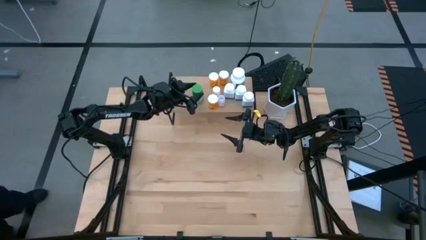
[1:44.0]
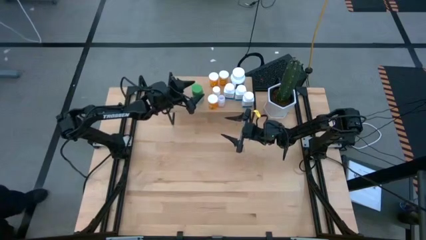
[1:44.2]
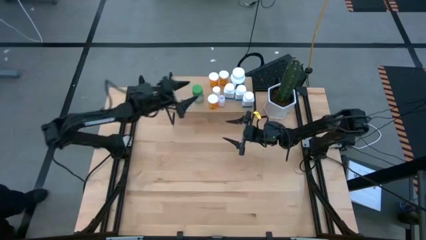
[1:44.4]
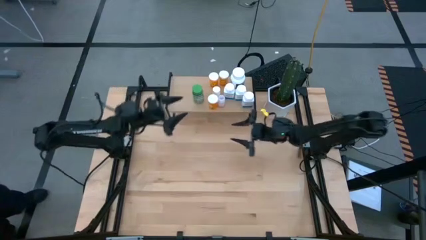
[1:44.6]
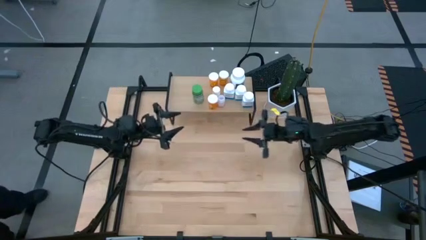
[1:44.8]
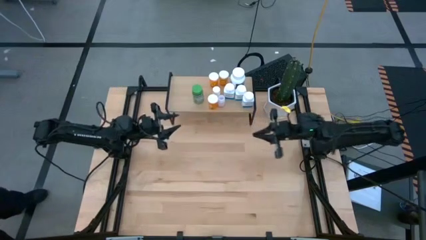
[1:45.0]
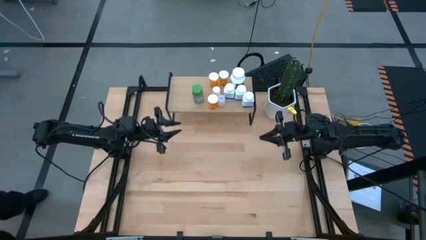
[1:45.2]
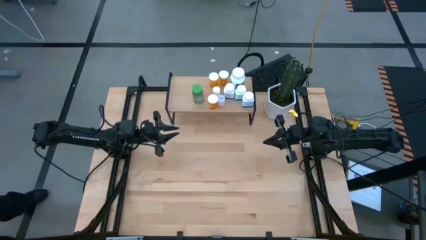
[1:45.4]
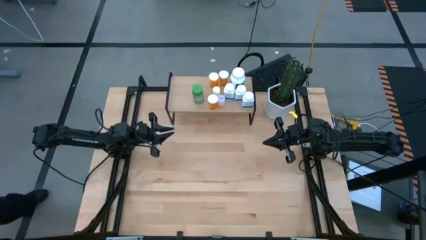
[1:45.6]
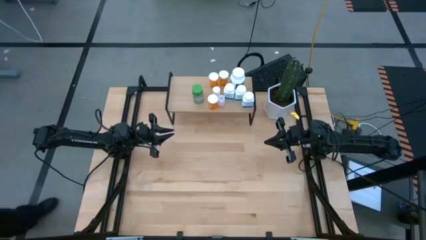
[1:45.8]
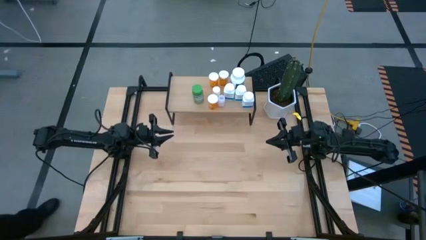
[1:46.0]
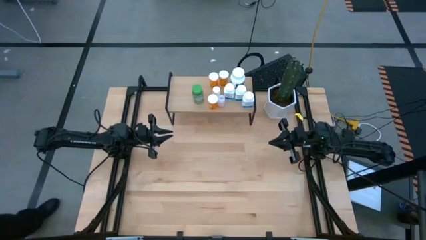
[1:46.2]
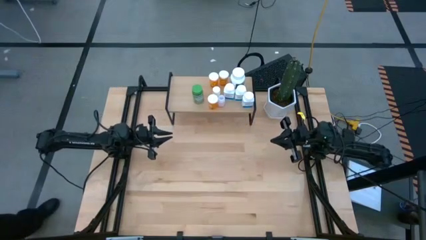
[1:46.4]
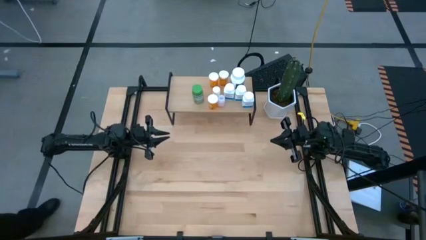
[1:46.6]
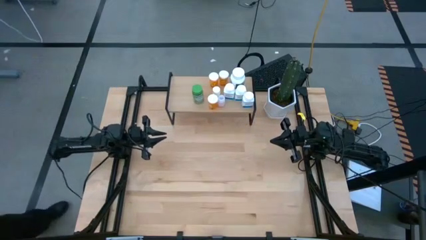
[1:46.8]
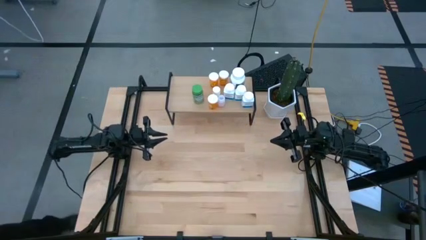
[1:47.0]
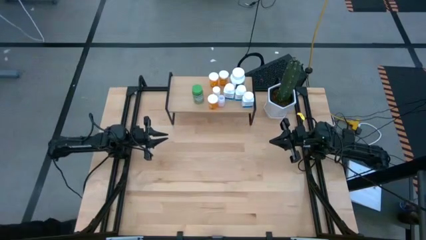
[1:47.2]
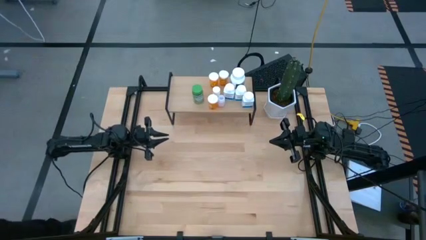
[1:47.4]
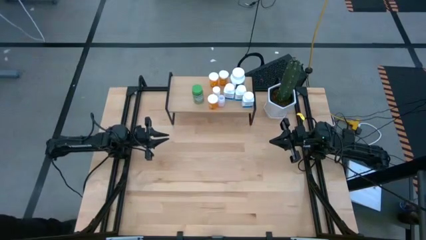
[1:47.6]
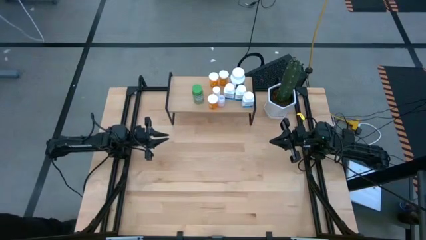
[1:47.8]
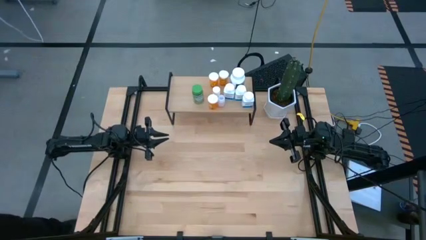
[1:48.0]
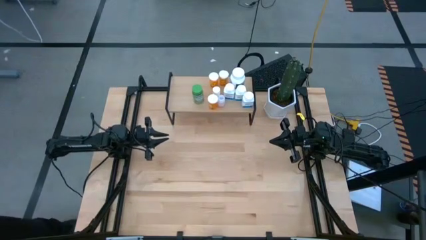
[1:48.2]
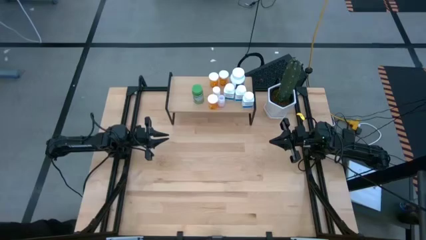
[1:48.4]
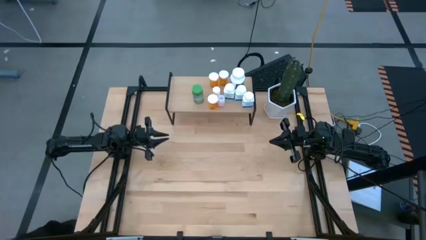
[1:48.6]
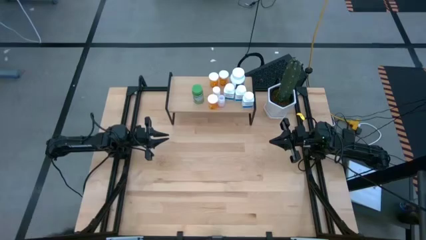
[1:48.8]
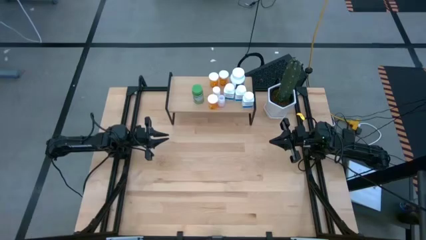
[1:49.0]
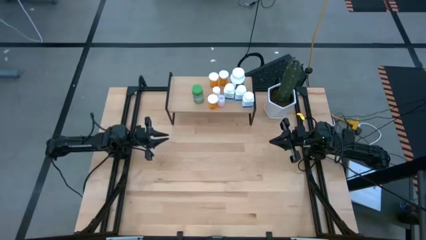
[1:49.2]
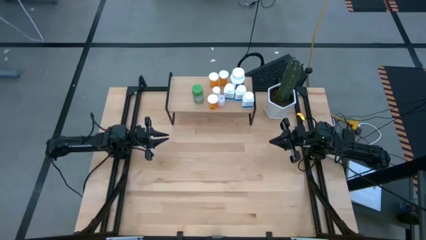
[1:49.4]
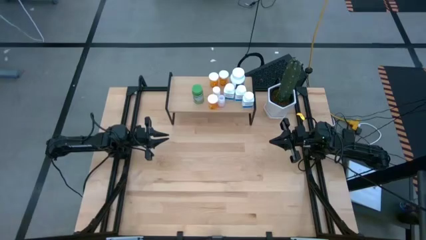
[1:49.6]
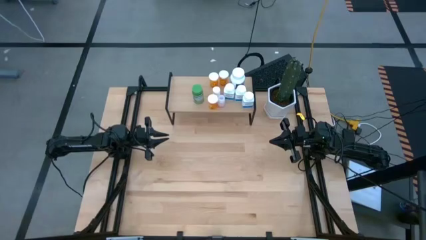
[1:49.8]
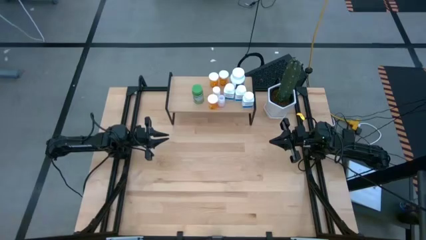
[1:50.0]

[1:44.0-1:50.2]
Task: Pick and place medicine bottles onto shelf by color
Return to Home Position

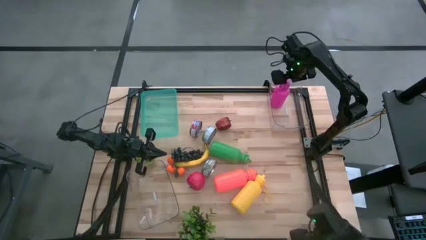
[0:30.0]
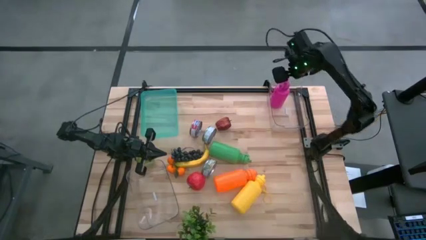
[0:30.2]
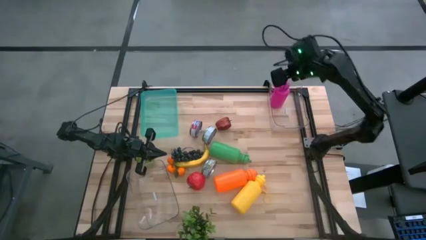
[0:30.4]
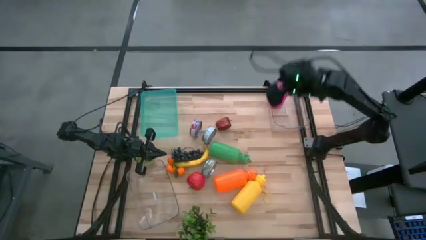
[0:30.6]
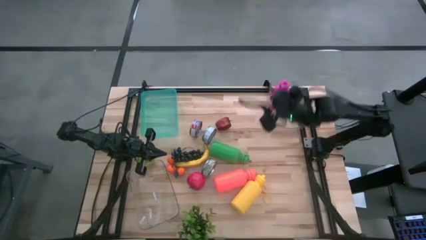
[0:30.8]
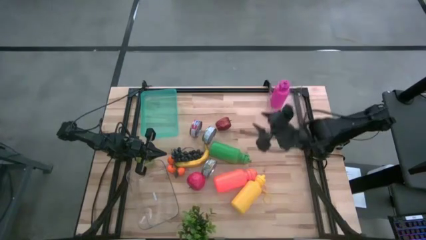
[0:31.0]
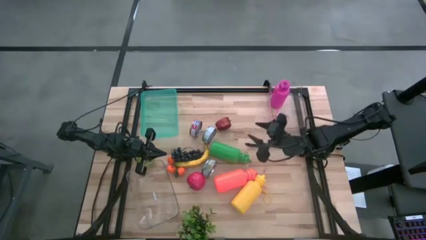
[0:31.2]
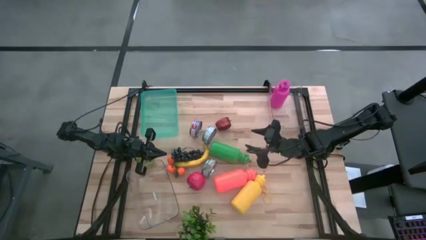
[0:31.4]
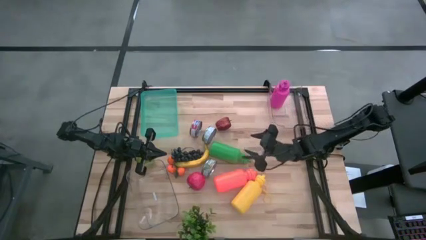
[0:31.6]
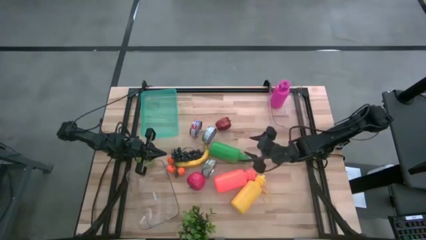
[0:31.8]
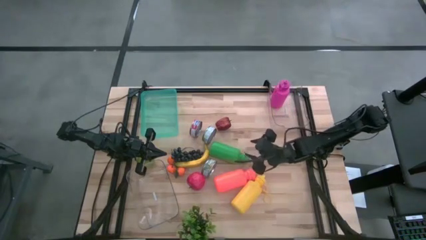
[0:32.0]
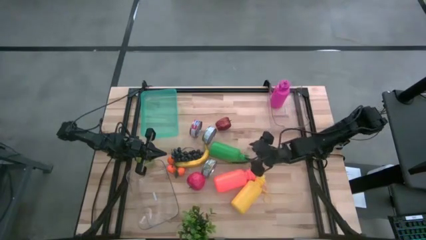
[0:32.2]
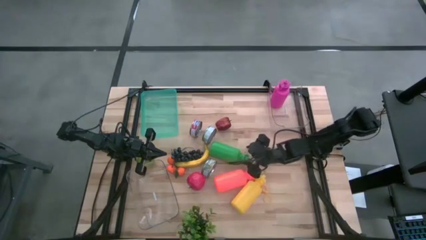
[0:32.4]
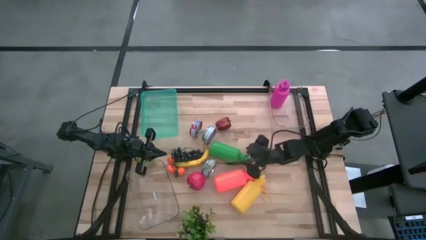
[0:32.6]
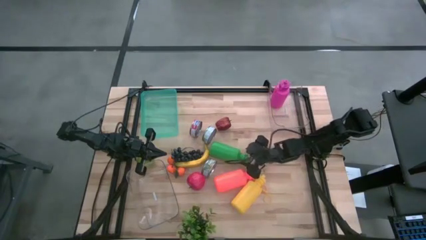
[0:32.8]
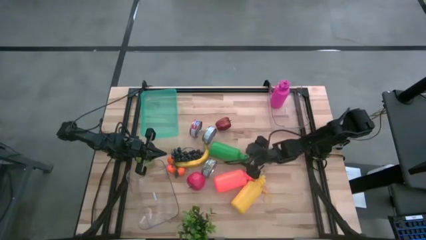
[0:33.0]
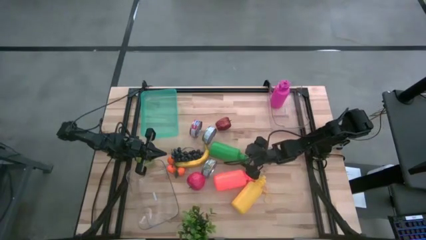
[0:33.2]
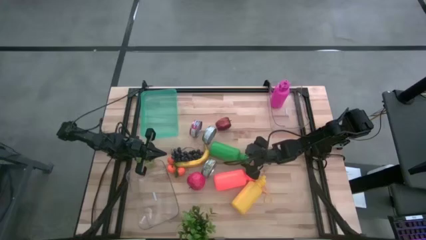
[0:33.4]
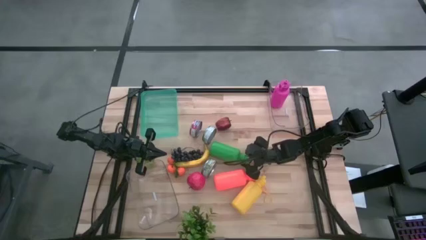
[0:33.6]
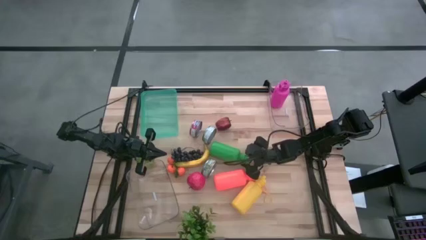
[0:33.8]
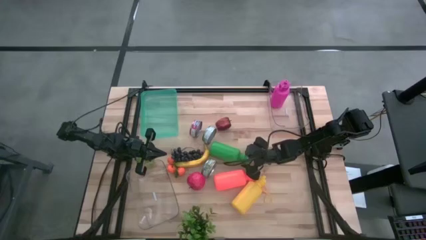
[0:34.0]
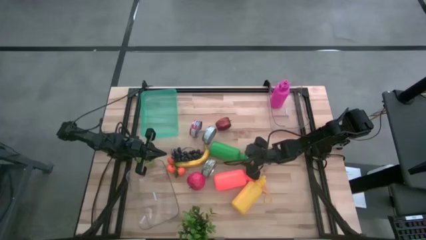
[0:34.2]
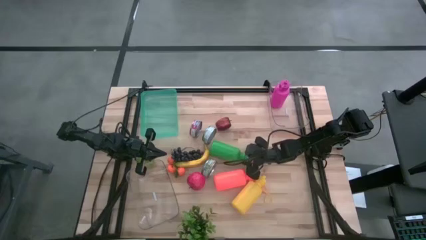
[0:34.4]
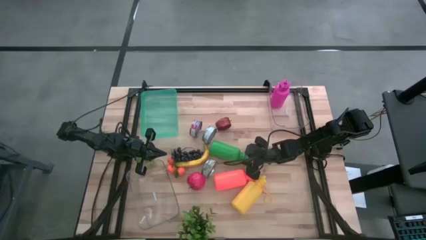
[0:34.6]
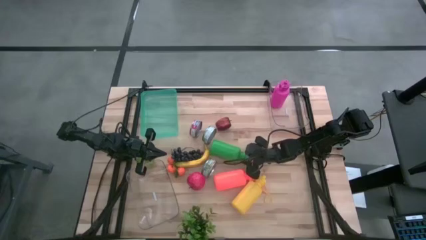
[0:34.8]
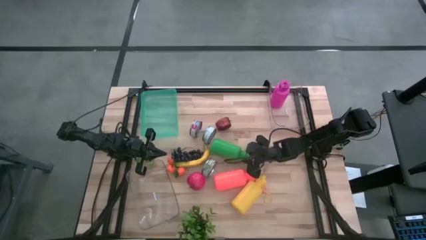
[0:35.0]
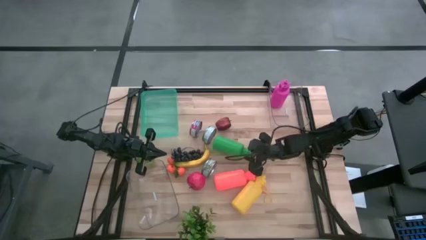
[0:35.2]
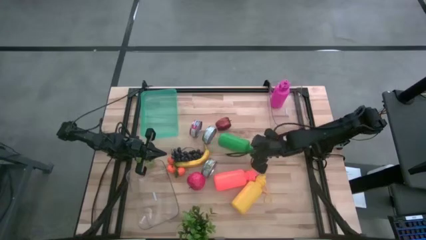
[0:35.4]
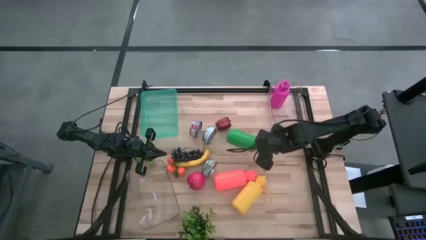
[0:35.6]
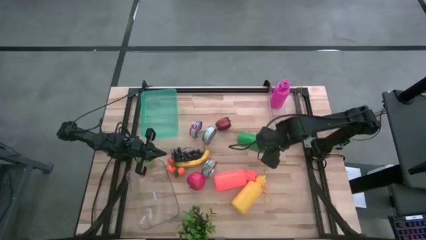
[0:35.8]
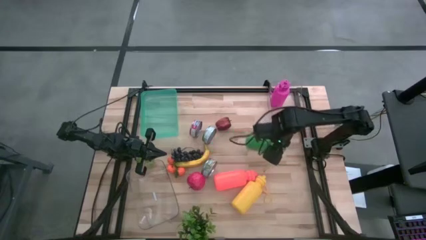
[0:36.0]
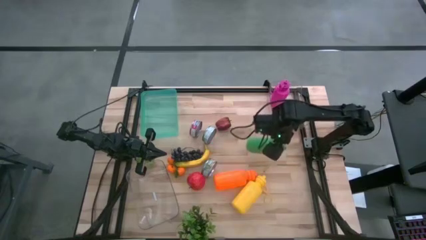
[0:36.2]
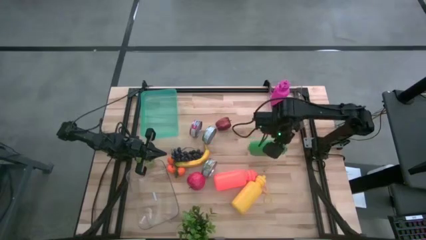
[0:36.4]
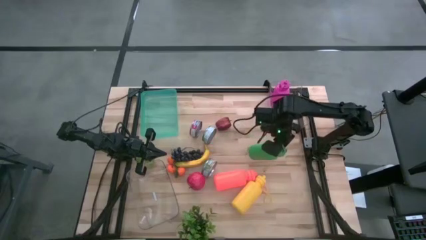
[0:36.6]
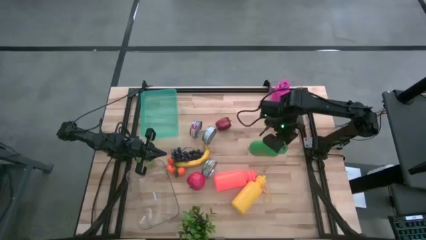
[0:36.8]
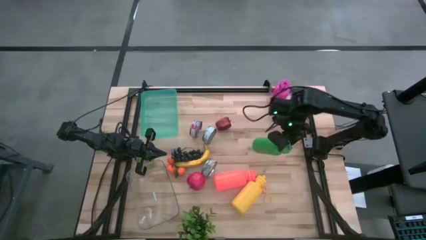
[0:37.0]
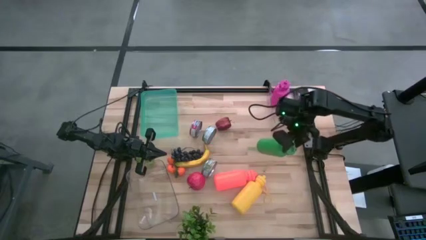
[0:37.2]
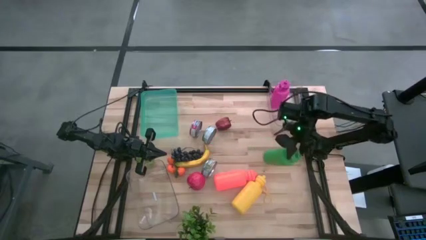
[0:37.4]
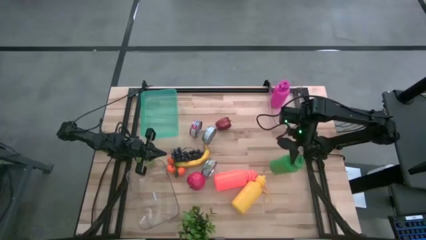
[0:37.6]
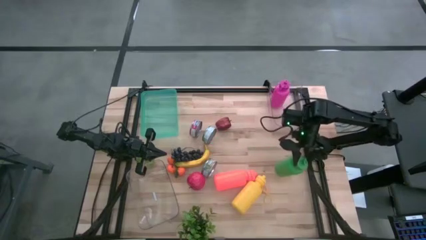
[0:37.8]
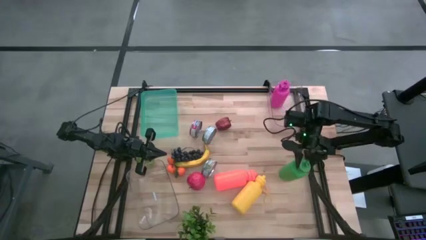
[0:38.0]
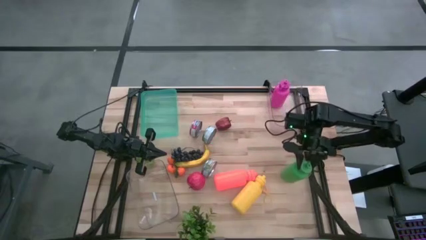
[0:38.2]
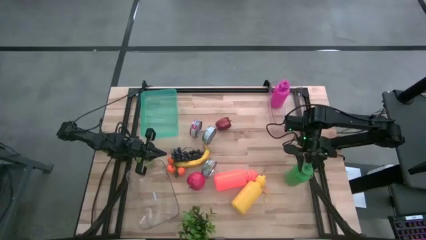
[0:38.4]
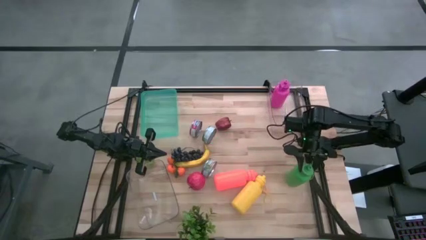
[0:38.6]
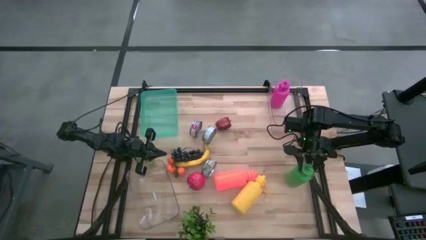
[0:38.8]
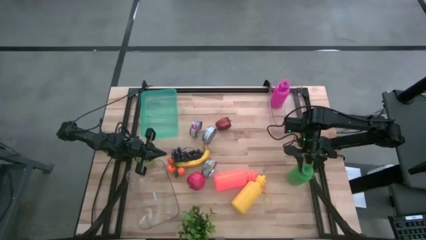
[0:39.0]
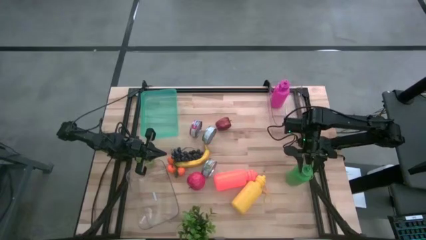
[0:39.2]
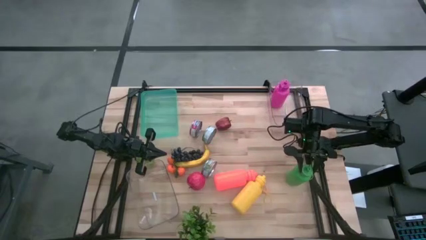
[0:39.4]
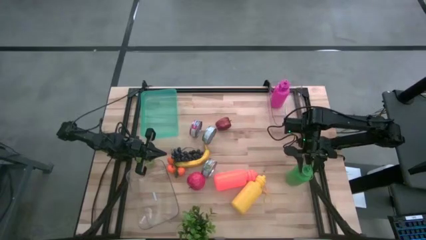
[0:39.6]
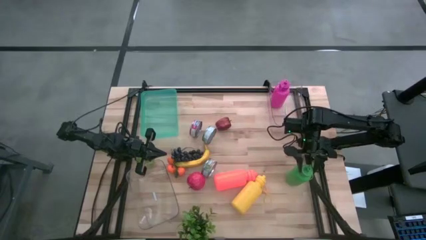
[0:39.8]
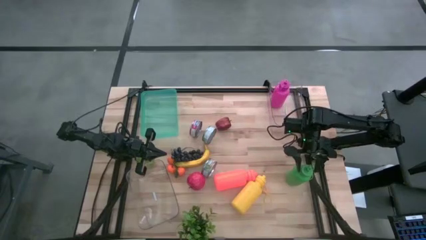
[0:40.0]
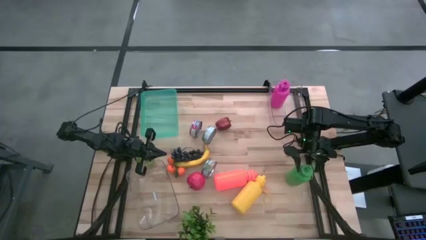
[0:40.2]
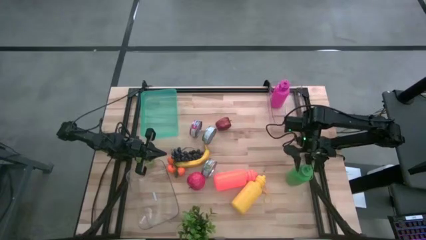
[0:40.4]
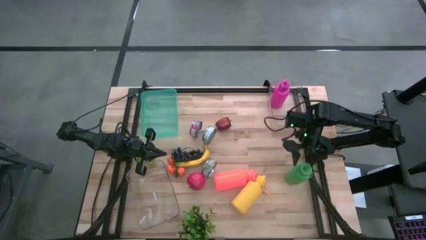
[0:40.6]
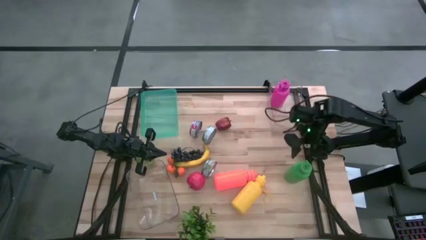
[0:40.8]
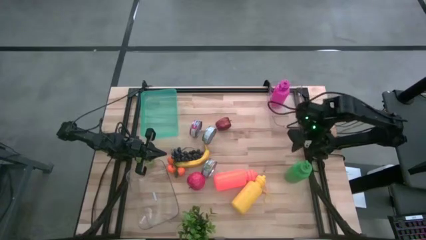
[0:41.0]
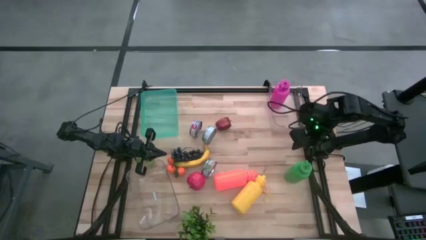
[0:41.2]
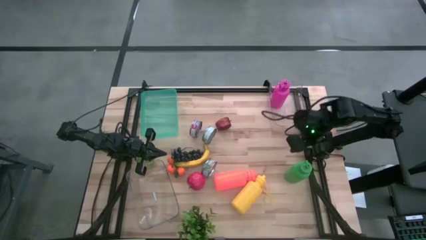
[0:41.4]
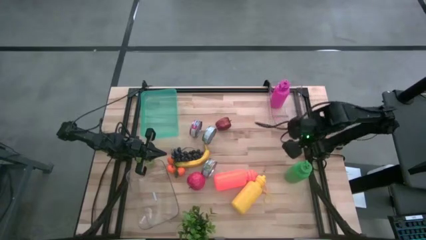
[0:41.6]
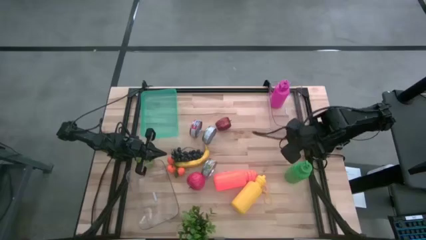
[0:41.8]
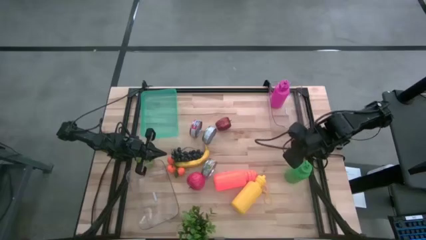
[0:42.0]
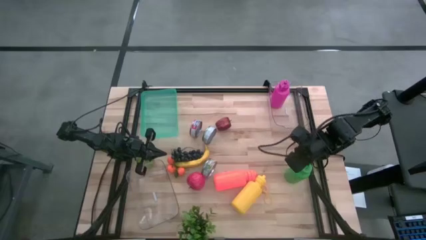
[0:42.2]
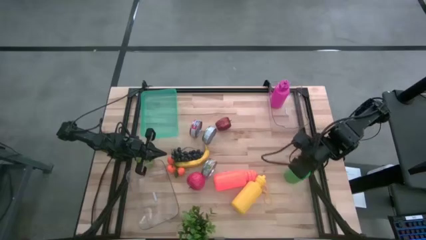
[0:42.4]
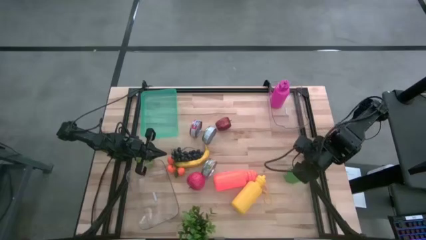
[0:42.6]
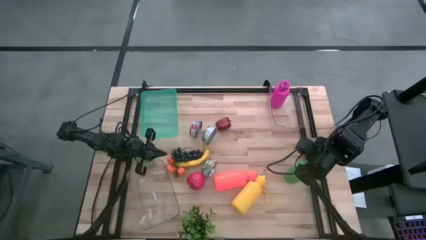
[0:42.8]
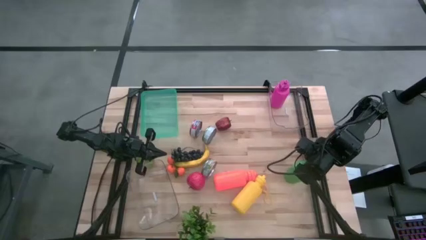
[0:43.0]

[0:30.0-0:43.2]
Task: Pick & Place Food Item
Put the green tumbler bottle into the top right transparent bin
